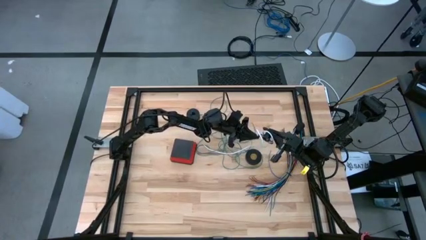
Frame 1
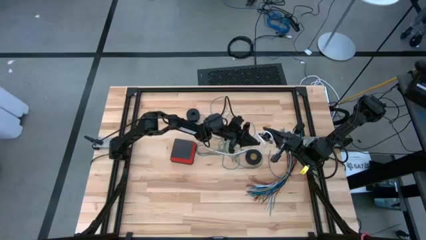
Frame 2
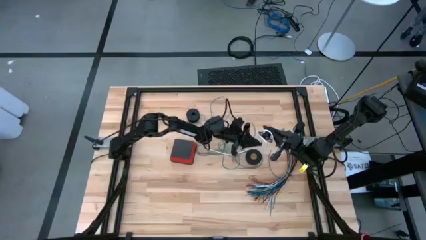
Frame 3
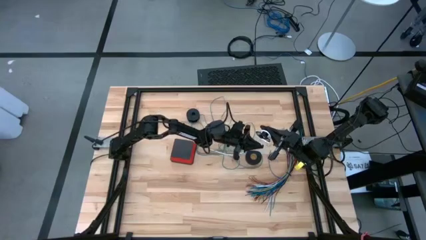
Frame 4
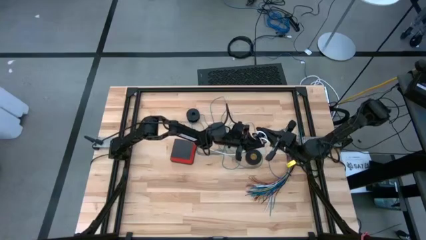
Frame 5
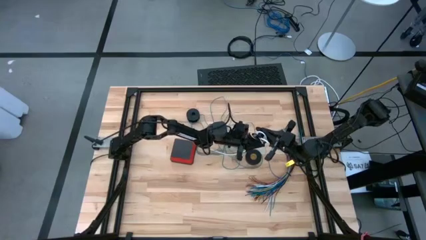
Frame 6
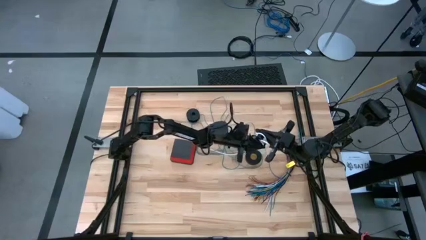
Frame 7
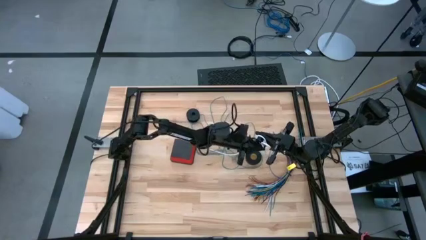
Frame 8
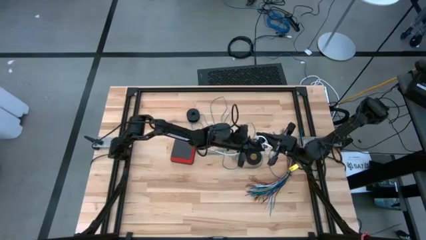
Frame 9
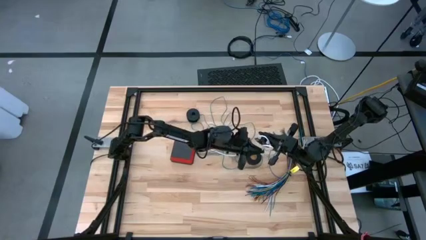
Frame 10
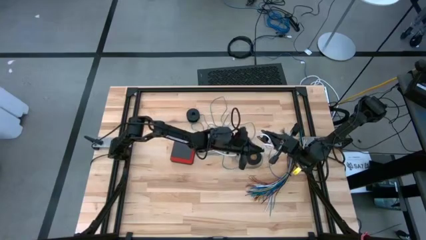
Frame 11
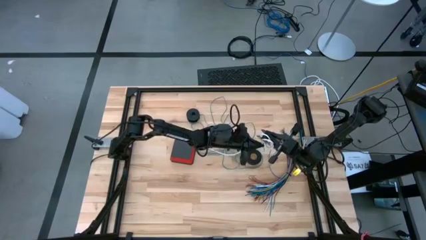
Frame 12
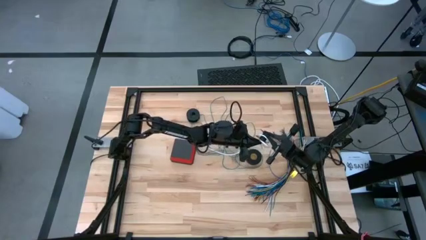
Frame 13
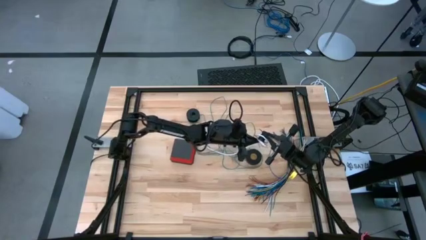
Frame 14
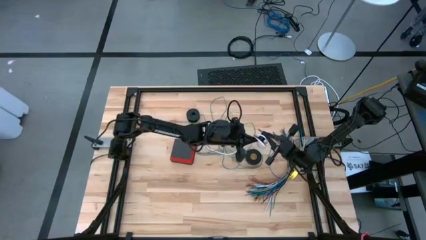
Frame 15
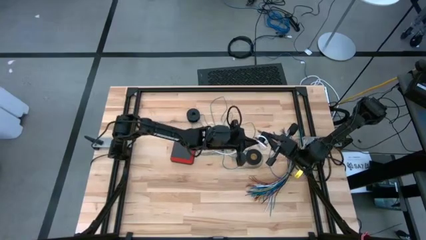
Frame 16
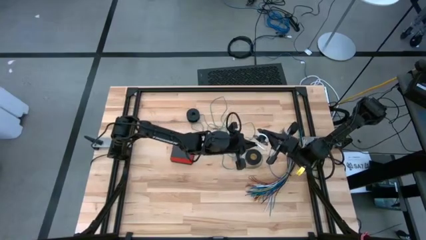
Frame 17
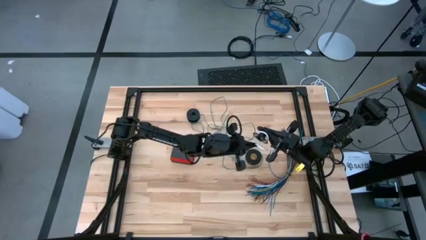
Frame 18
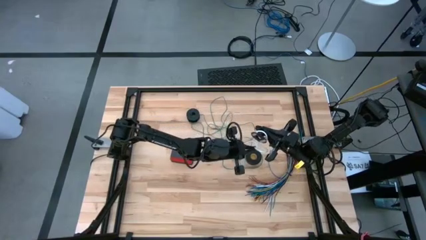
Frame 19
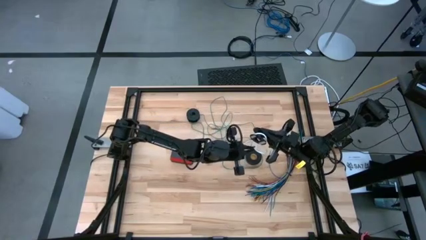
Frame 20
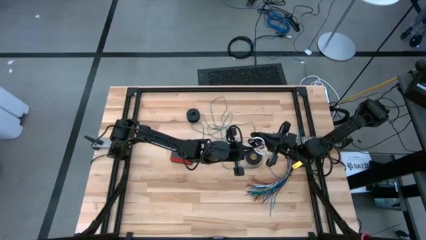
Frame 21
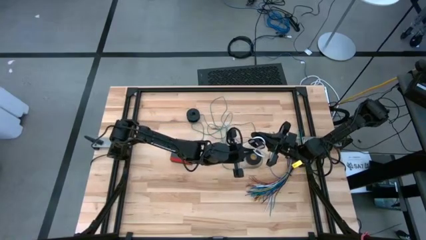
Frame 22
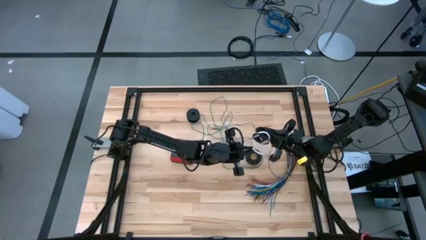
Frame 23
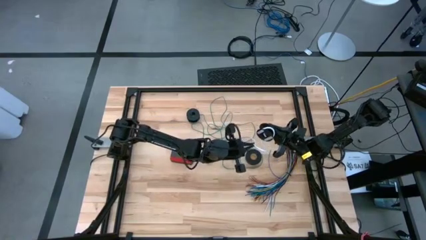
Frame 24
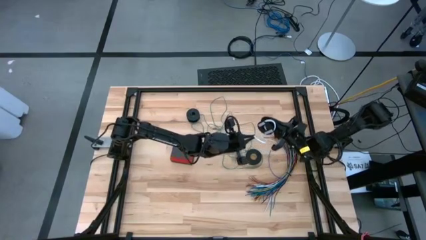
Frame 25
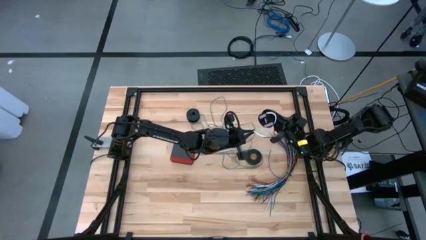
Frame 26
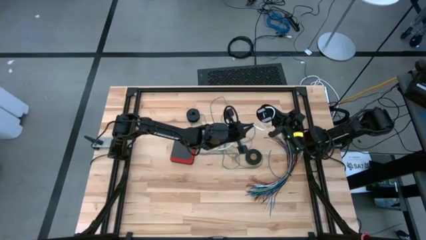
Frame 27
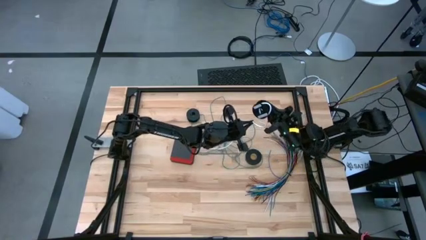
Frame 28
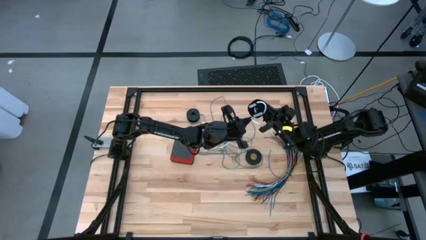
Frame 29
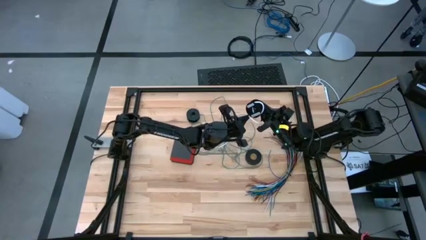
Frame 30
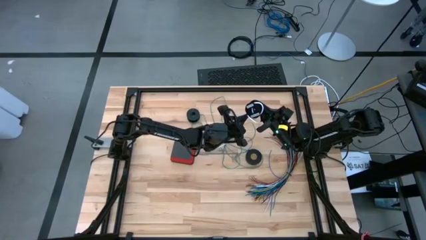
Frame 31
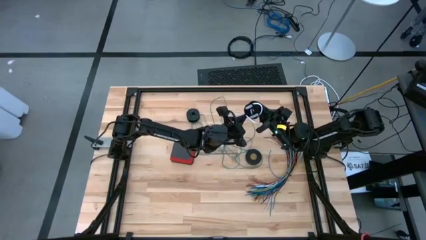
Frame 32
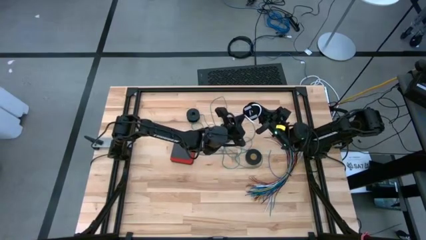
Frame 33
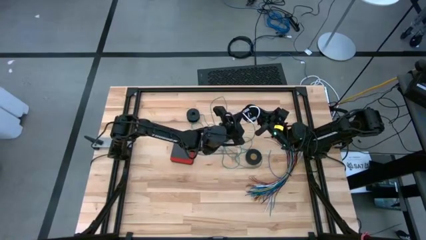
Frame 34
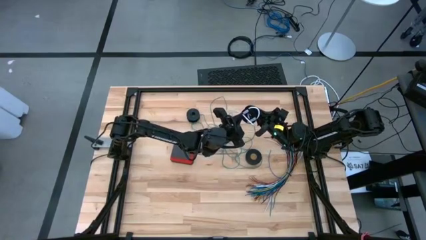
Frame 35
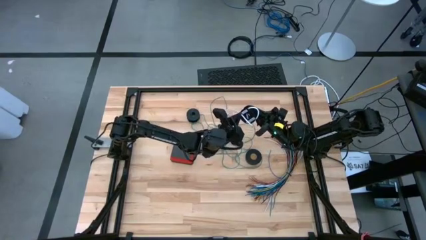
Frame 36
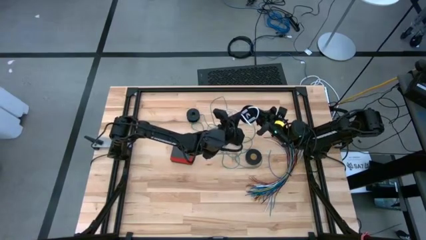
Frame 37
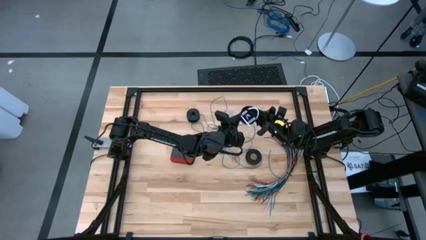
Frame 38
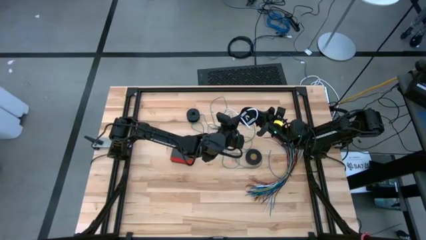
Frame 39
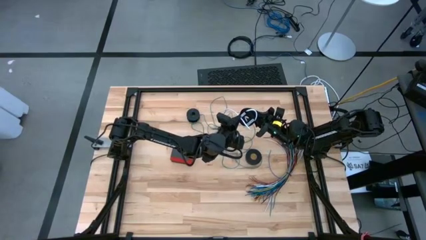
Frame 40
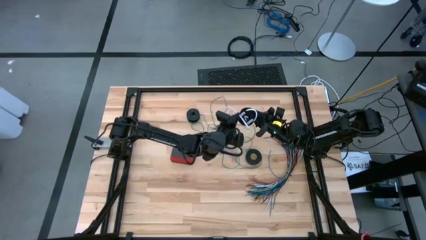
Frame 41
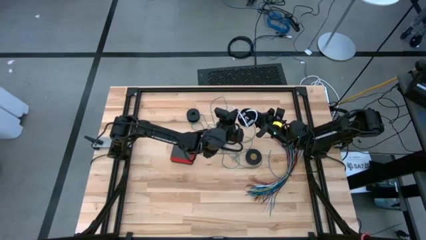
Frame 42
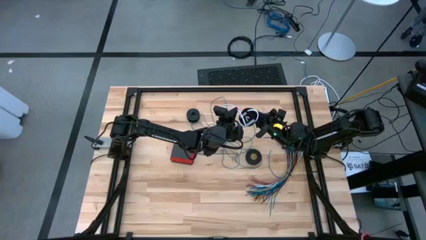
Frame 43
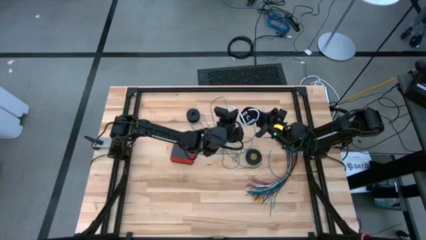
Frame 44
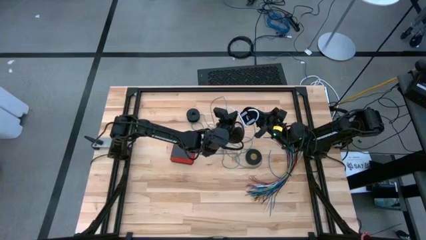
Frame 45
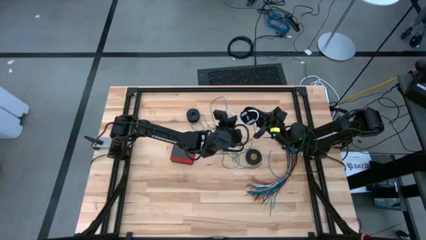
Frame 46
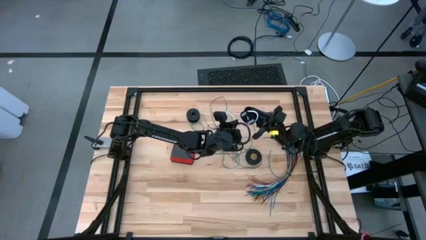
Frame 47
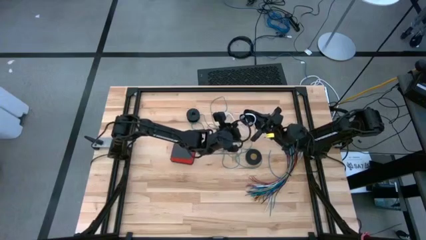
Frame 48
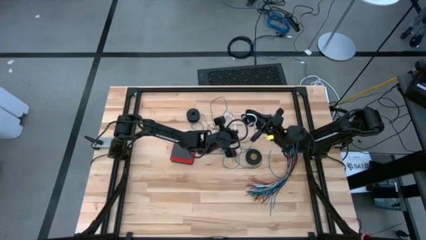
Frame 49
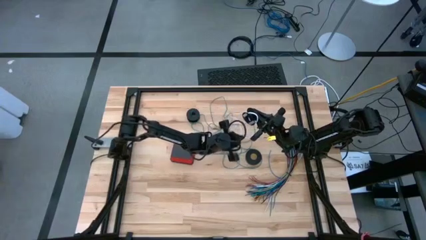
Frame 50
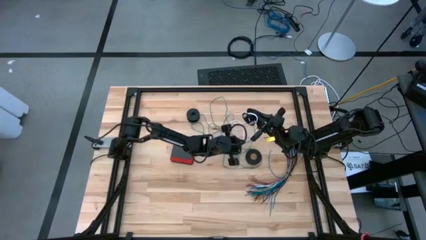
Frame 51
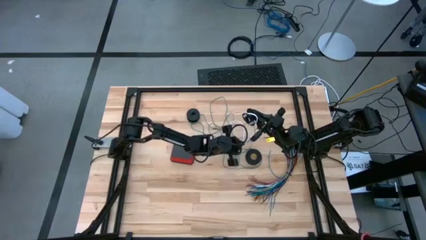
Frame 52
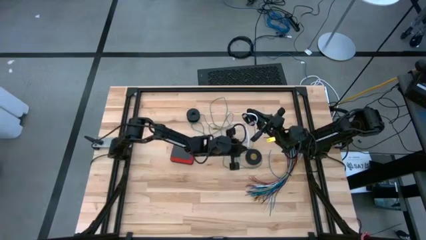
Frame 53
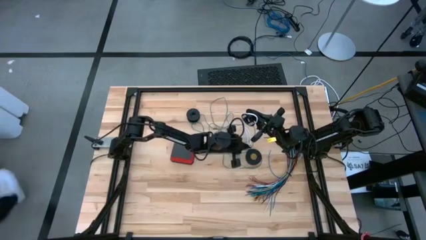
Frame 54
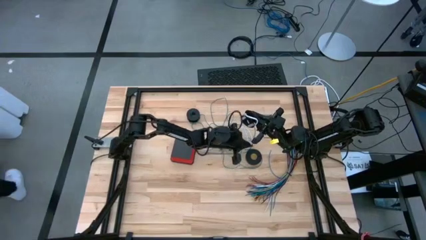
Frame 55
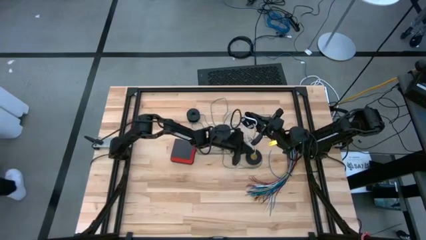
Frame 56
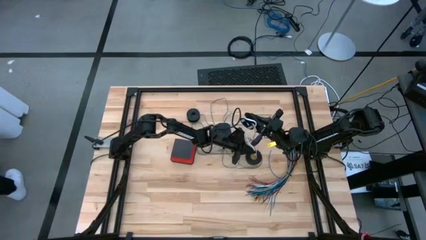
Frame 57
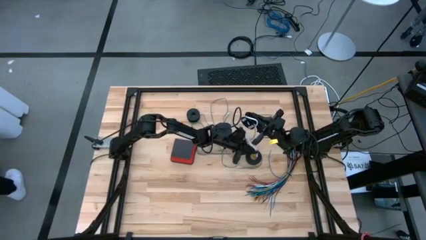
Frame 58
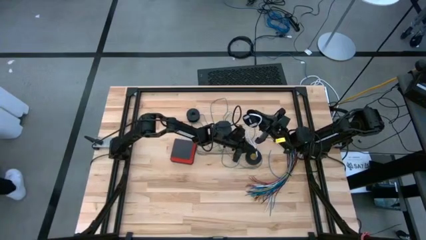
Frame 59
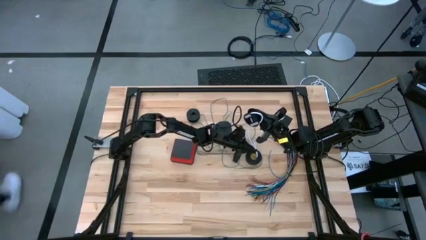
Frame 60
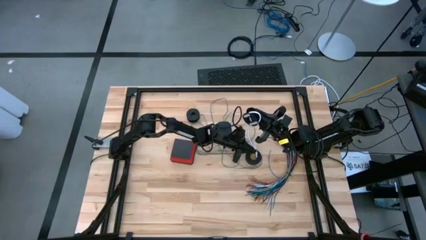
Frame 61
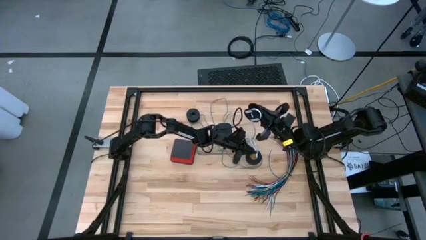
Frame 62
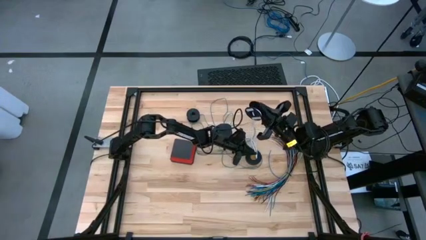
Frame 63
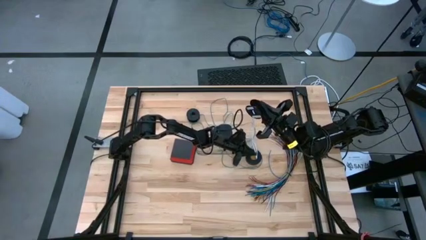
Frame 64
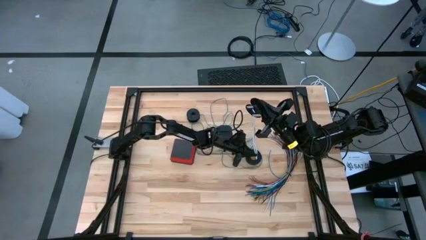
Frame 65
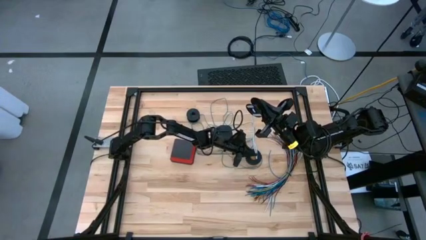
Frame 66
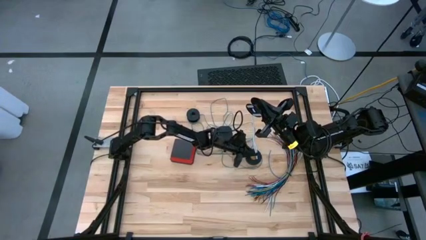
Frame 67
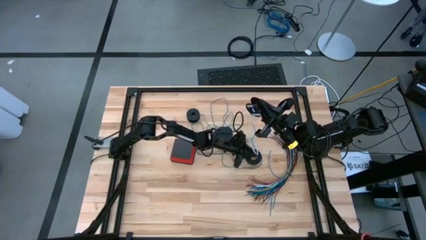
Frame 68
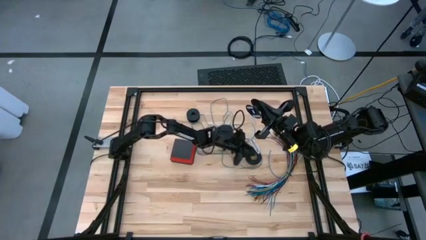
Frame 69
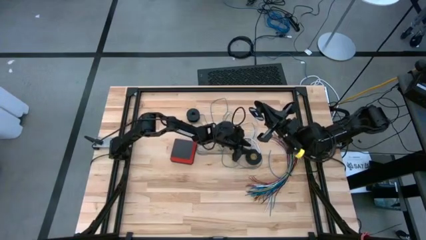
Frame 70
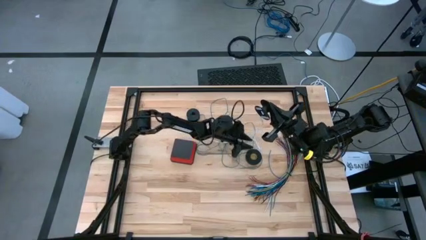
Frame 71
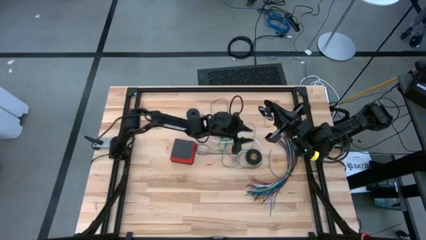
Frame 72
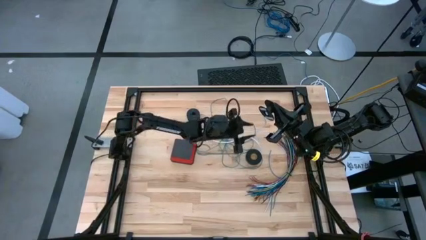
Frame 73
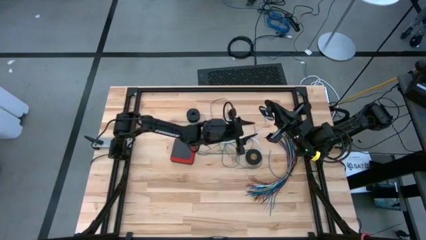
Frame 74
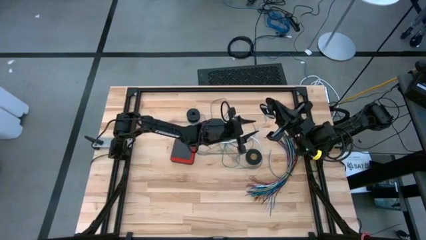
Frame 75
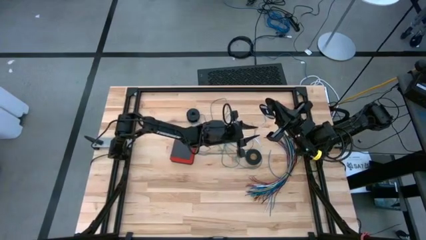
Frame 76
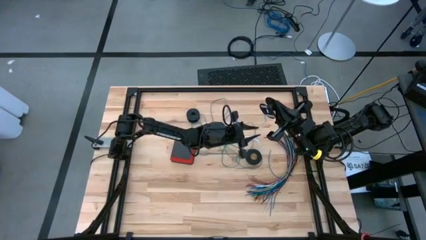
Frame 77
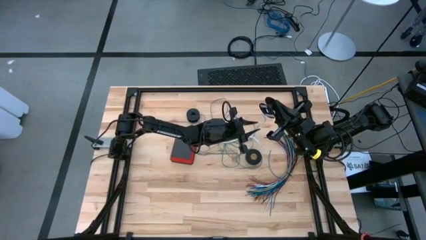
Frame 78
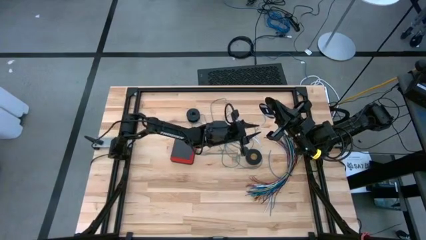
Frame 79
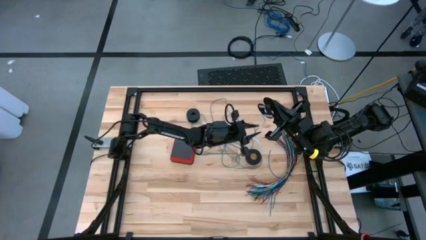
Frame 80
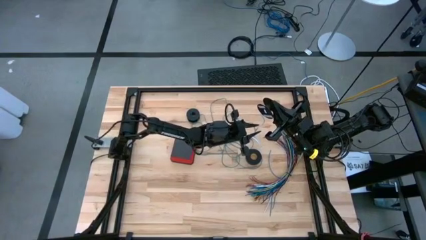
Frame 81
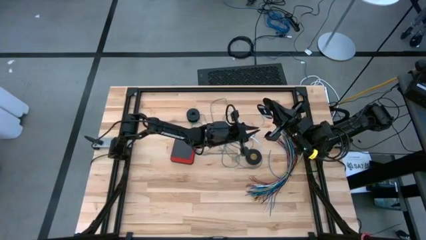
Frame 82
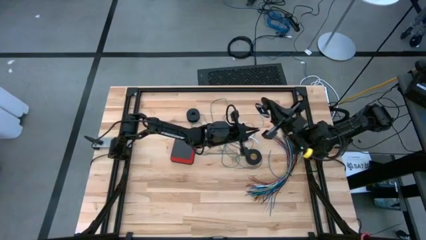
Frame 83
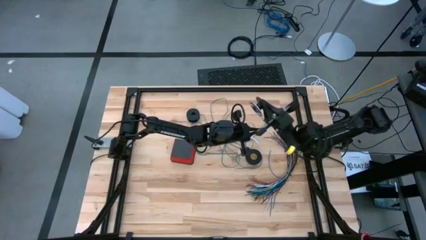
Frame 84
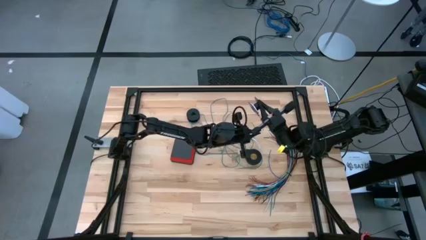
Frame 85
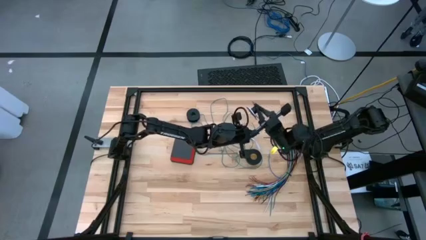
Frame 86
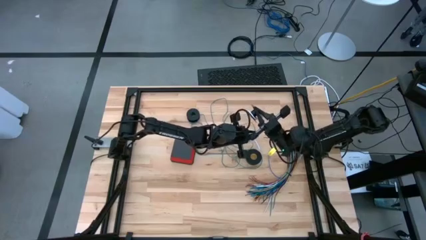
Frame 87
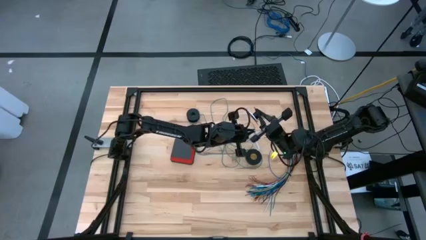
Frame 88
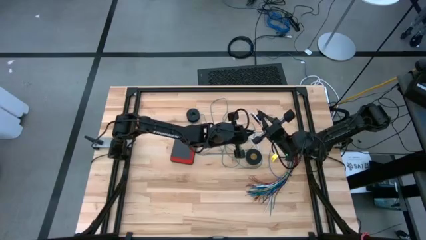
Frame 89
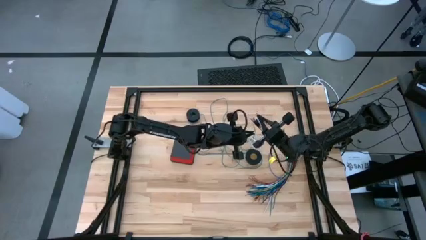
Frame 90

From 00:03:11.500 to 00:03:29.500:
Task: Coiling cords
Coil the white wire cable on the spool
